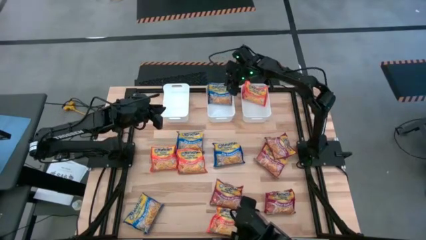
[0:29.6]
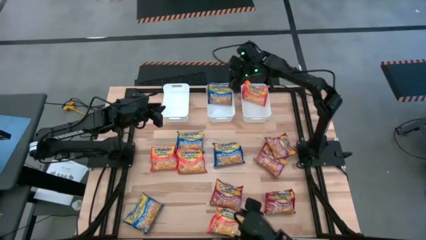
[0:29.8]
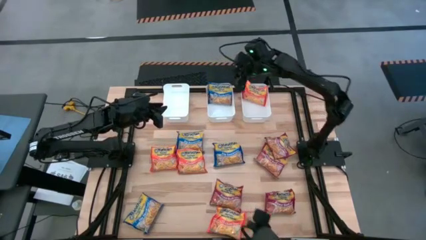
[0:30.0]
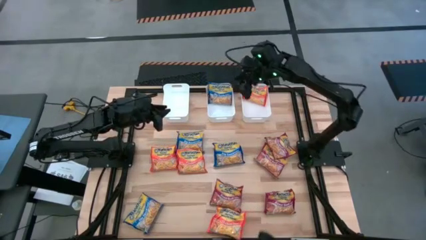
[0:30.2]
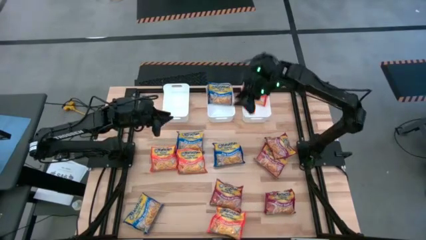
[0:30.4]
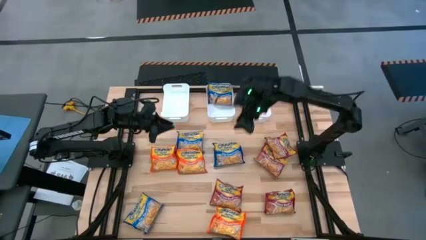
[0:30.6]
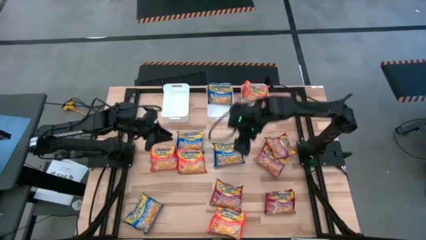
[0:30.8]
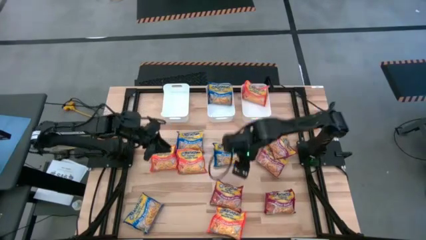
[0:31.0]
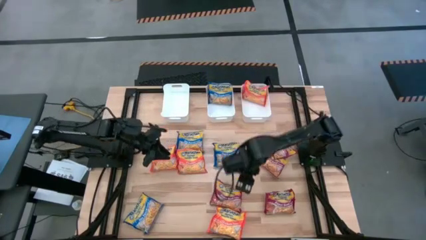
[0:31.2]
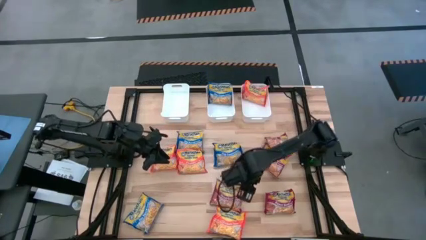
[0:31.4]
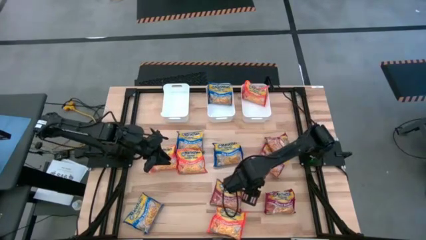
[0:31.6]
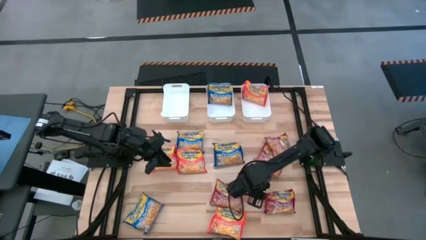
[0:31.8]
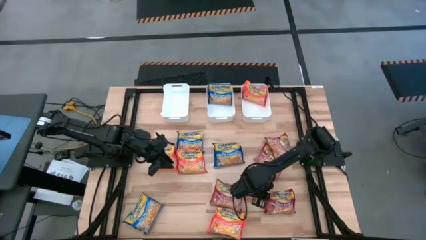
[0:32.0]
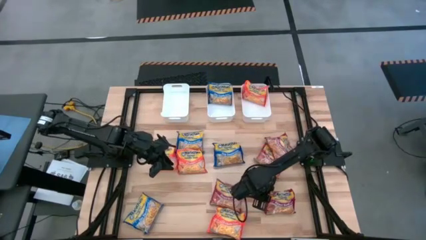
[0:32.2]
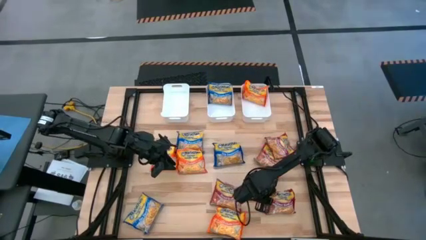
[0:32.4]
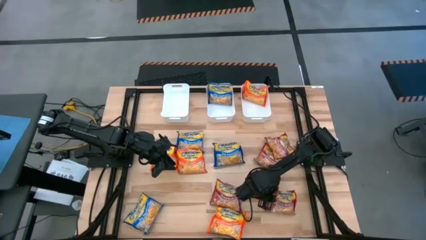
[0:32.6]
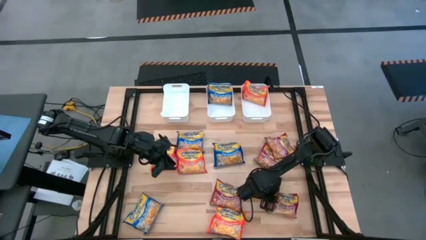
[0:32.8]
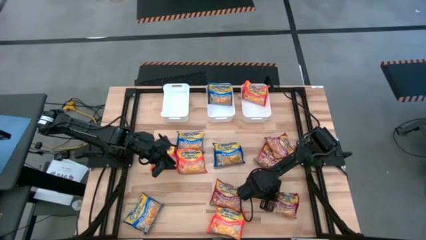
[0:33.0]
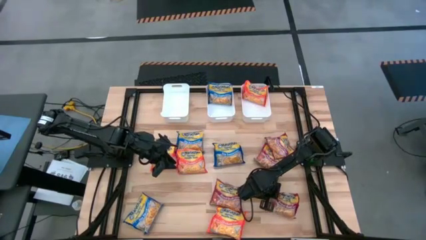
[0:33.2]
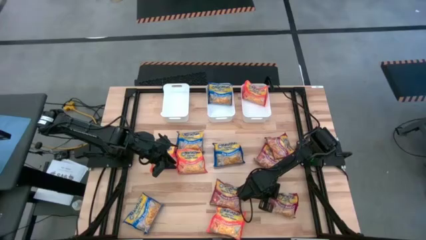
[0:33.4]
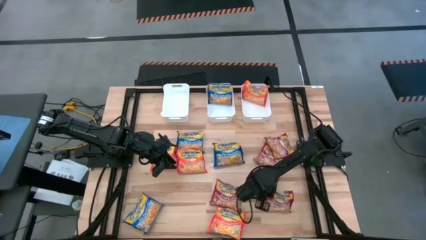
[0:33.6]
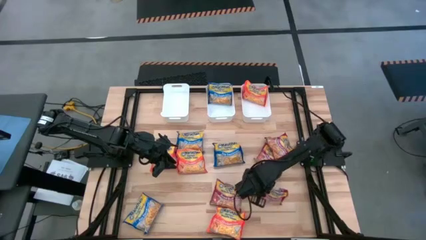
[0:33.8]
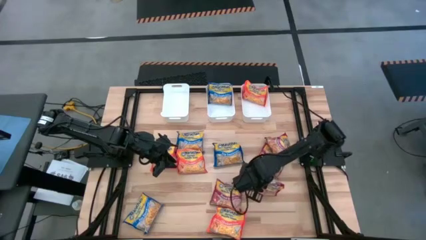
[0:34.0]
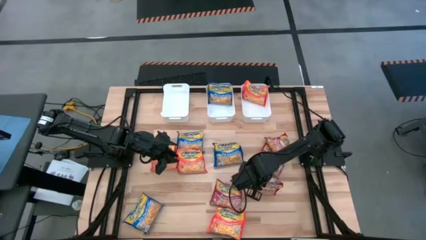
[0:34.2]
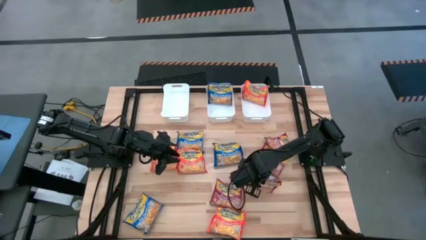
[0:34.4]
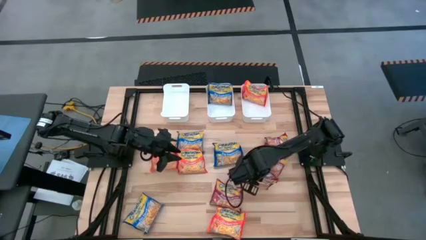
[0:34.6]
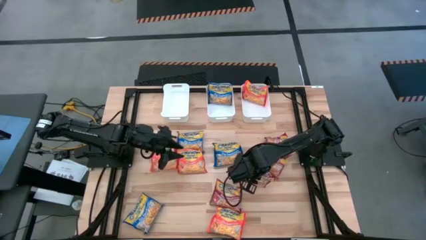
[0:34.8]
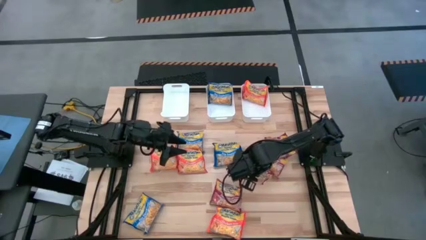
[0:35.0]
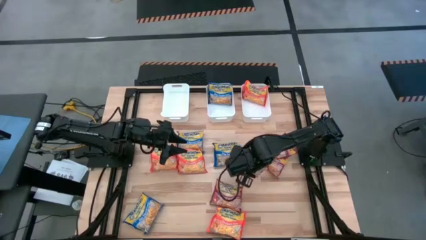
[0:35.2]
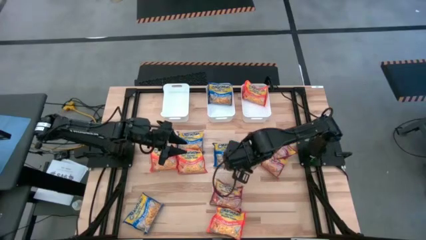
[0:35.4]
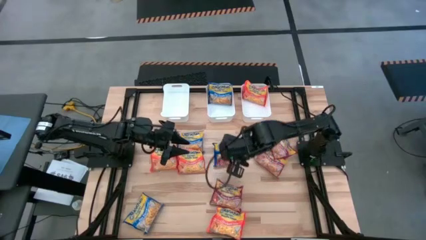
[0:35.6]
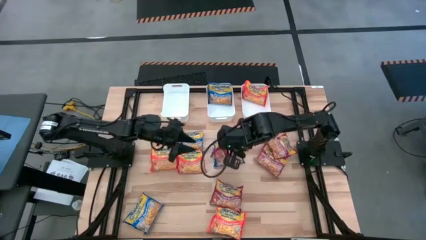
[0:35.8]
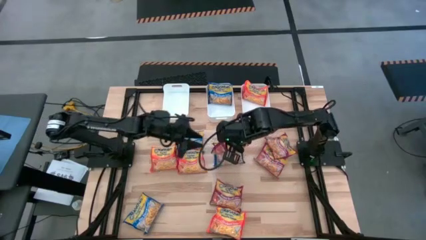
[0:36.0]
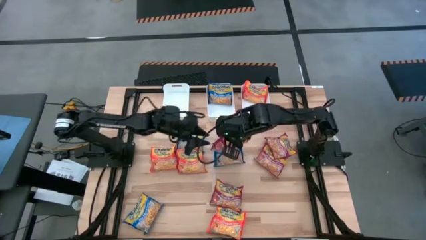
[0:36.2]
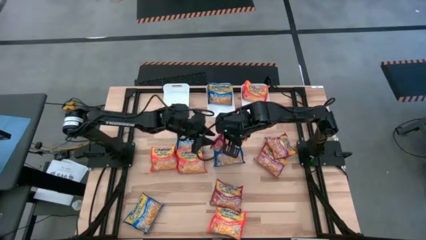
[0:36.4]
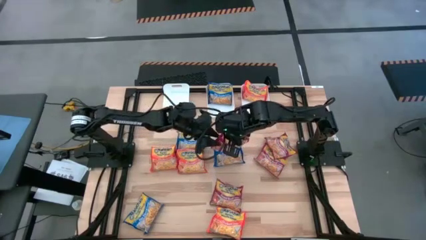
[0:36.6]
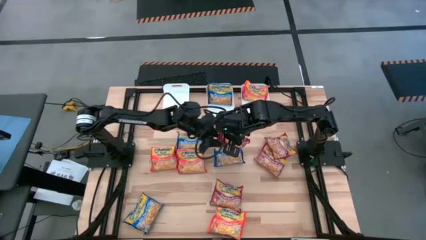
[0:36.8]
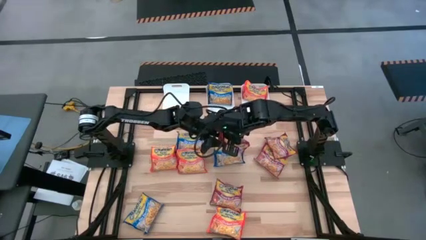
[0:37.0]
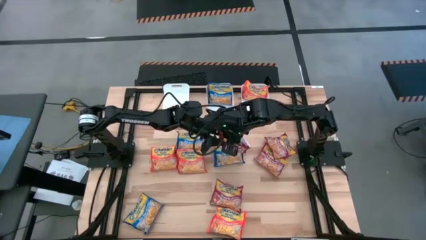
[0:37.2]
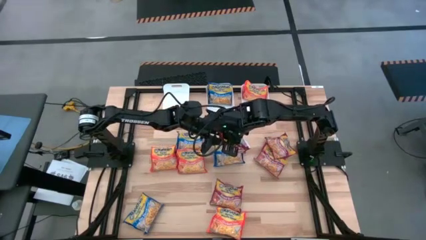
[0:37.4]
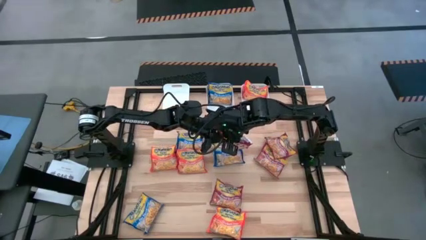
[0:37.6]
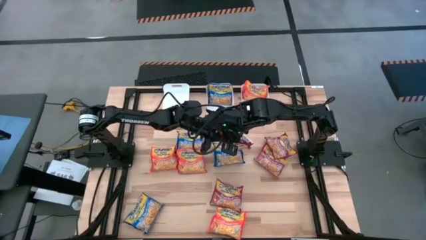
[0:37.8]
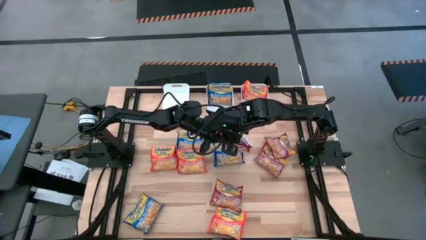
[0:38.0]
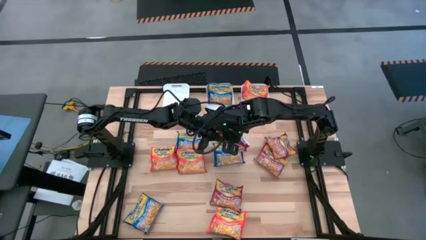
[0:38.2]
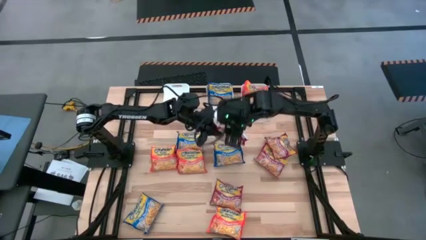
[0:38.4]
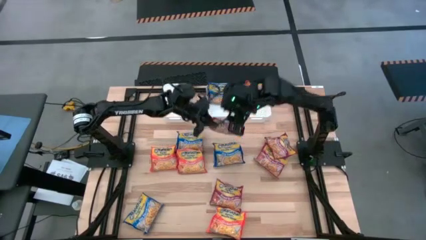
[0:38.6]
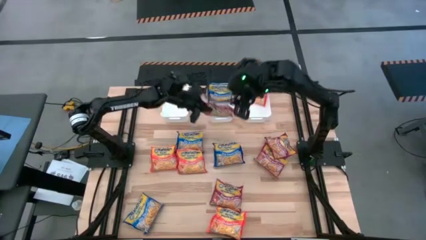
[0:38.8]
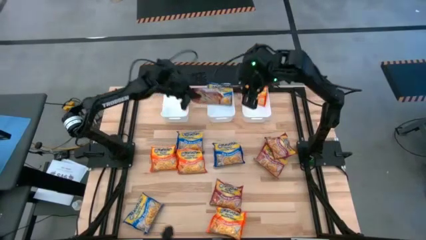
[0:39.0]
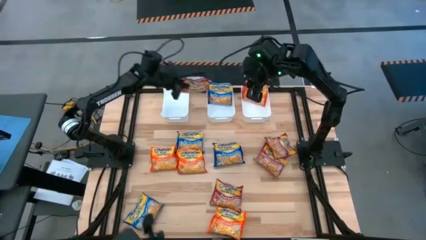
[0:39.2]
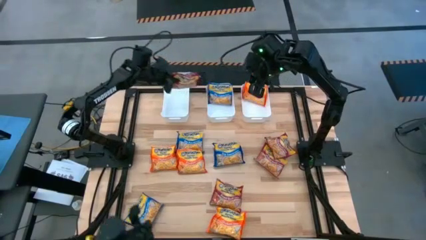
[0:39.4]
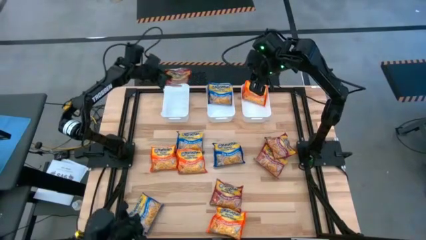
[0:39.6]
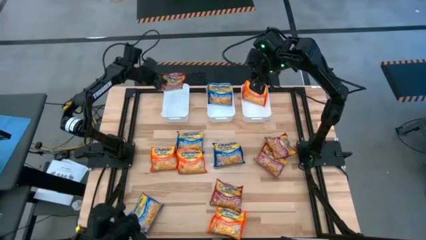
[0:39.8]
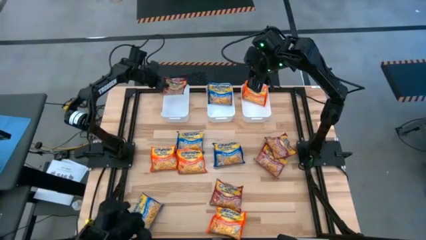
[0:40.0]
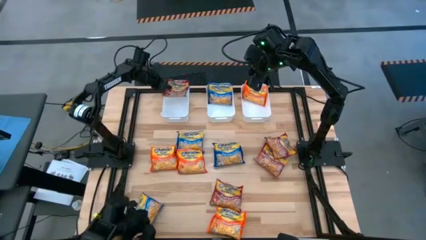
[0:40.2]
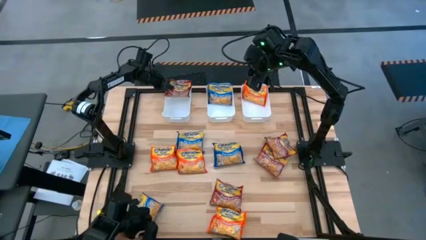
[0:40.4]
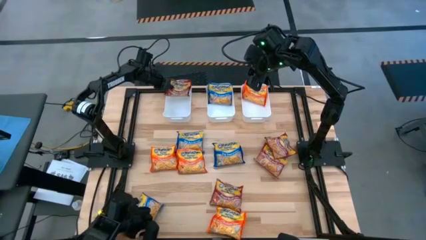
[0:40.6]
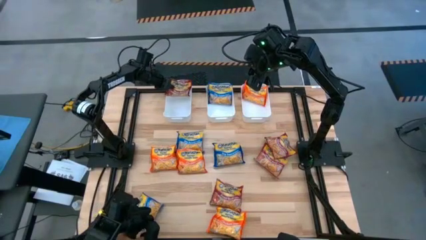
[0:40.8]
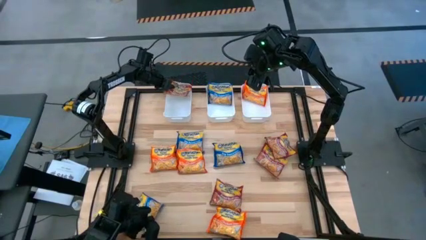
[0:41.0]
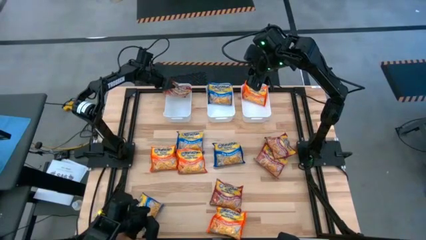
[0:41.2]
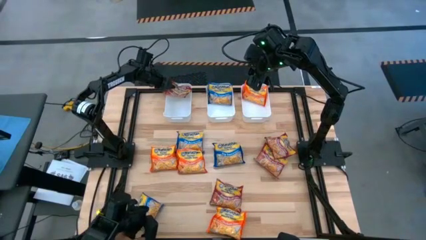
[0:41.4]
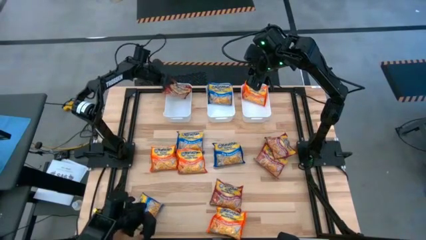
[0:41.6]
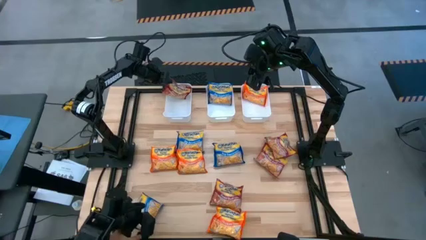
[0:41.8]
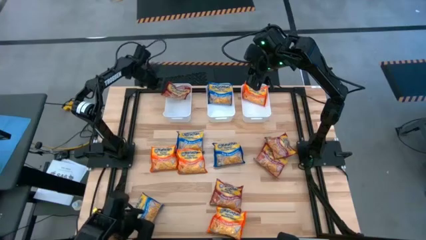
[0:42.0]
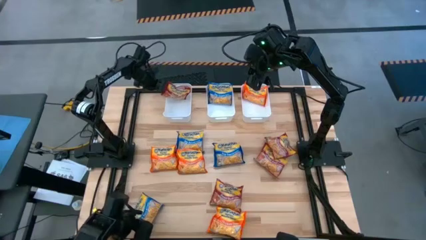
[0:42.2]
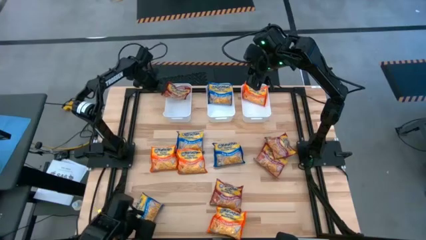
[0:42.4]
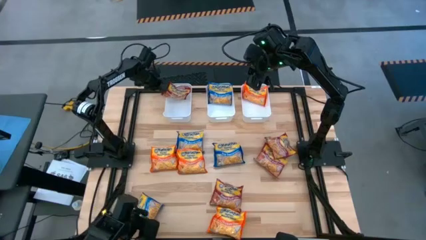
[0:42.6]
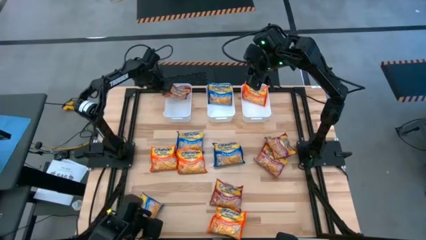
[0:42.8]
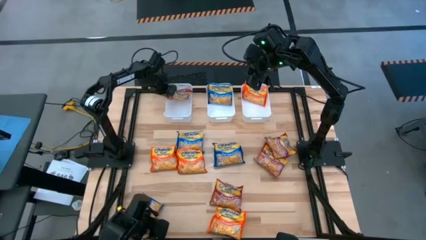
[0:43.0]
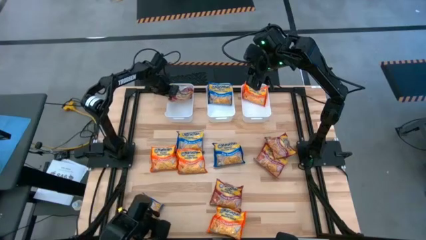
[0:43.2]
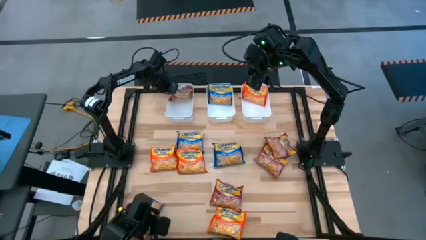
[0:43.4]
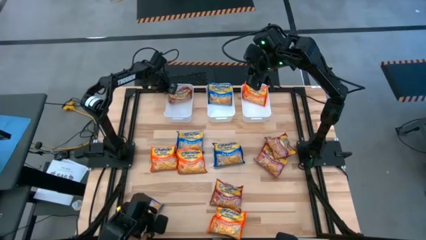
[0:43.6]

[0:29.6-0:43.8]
Task: Sort Maruchan noodles
Put the bottom red noodle pack into the top left white bin

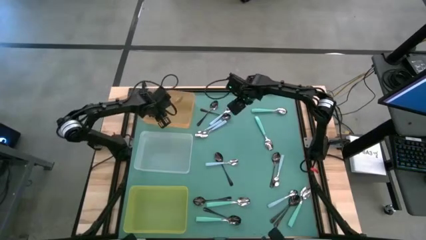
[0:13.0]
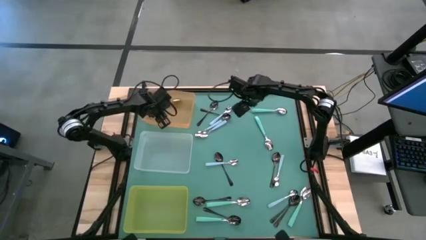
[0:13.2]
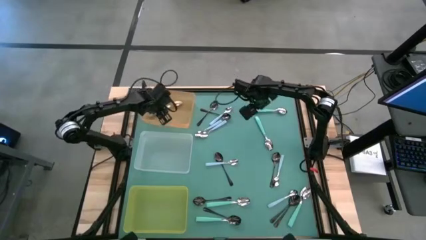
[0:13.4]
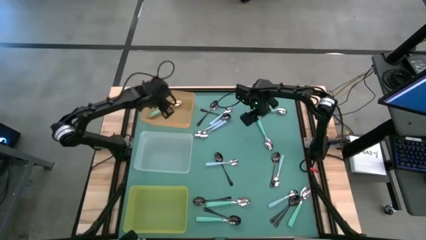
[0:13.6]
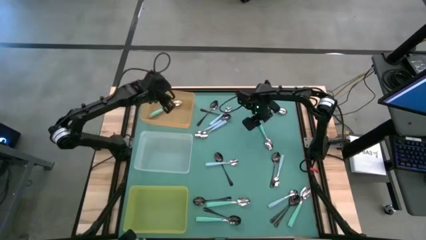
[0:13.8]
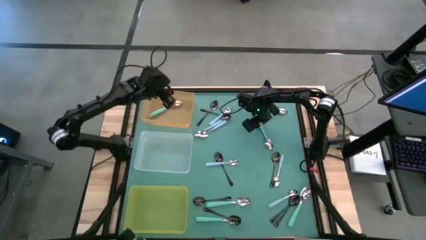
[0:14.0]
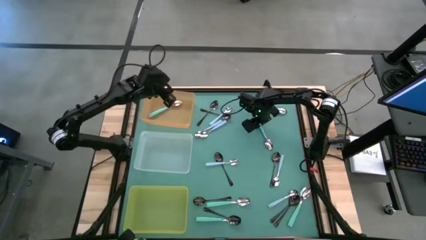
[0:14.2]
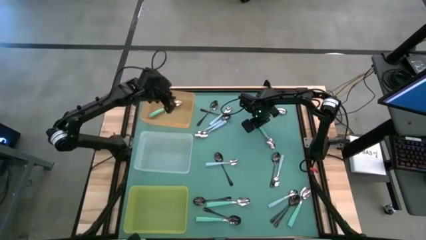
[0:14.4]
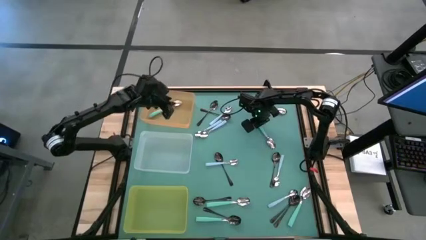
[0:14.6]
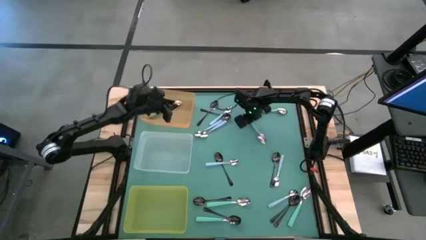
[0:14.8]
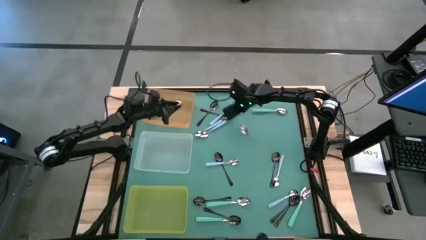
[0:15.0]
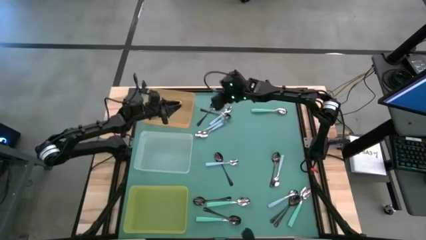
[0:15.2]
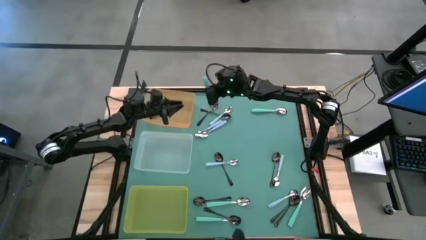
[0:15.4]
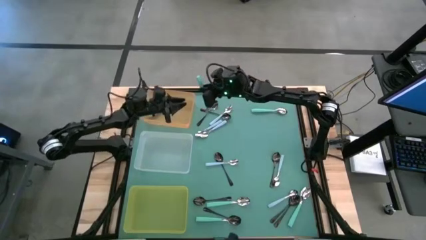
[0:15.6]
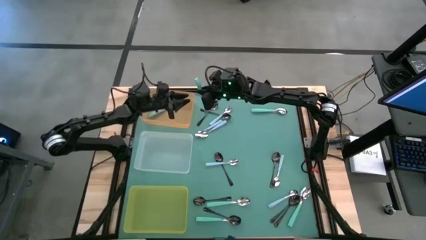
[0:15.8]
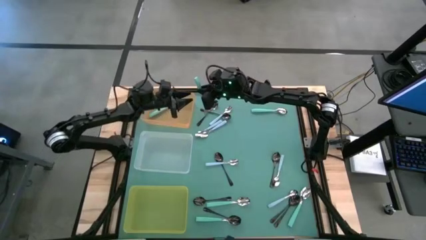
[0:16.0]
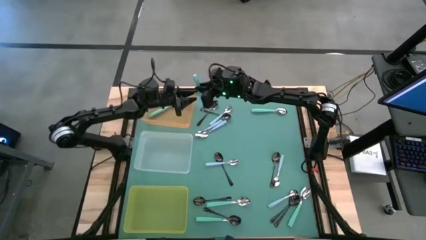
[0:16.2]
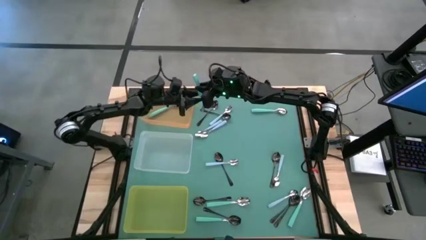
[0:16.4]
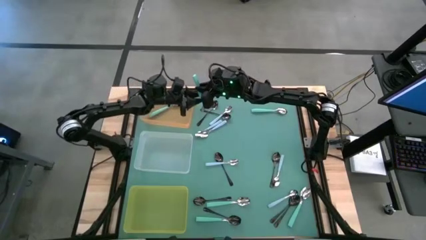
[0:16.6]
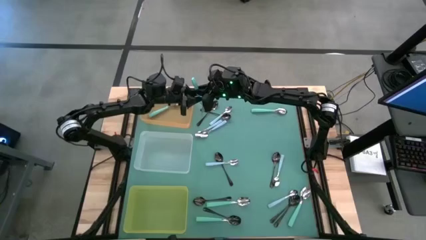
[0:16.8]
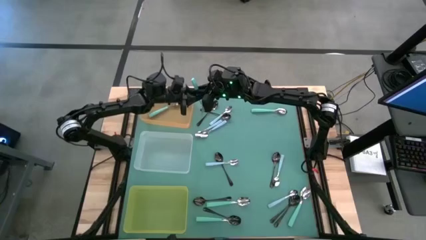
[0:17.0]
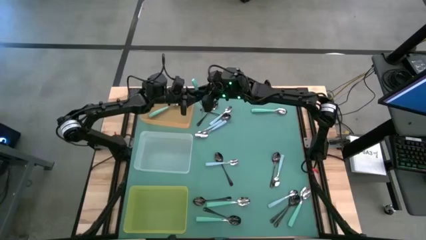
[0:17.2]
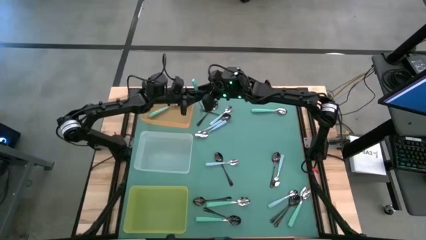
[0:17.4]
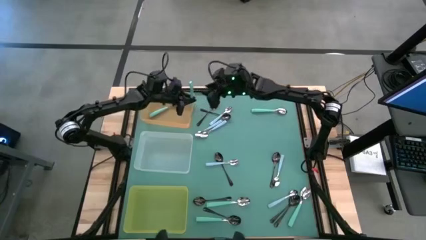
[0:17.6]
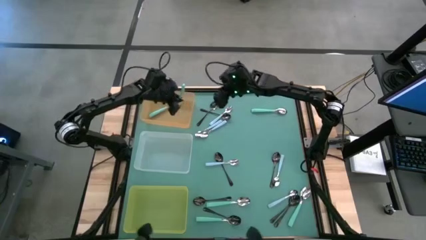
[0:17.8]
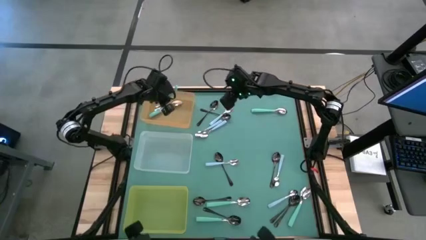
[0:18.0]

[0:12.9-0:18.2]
Task: Sort silverware by color (type)
Put the green spoon into the orange bin
